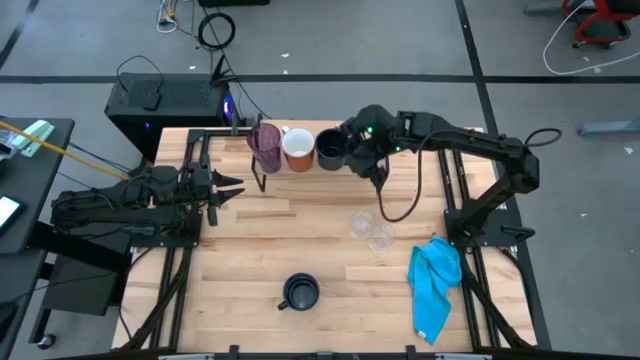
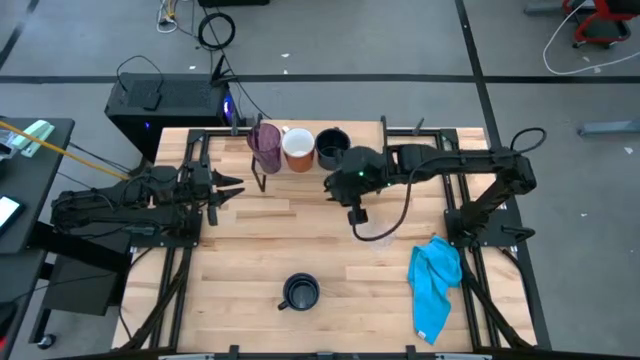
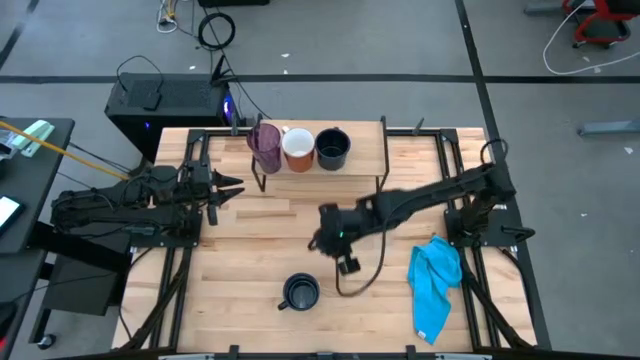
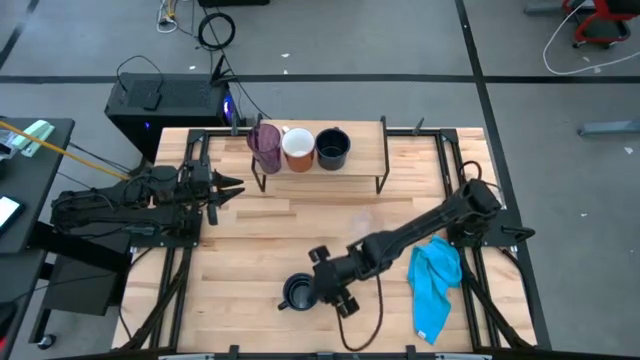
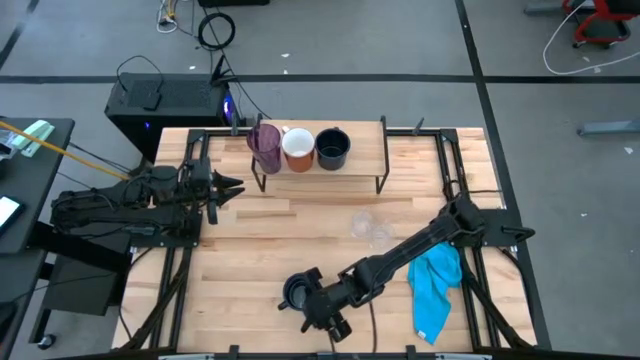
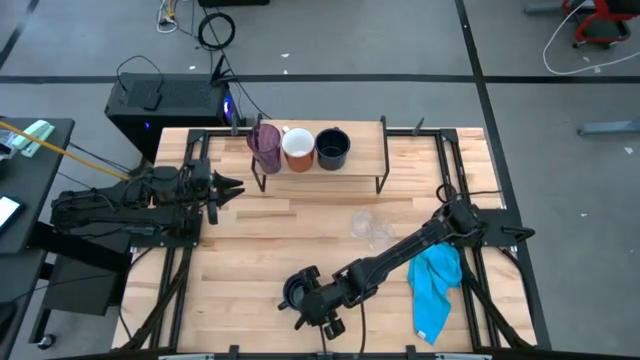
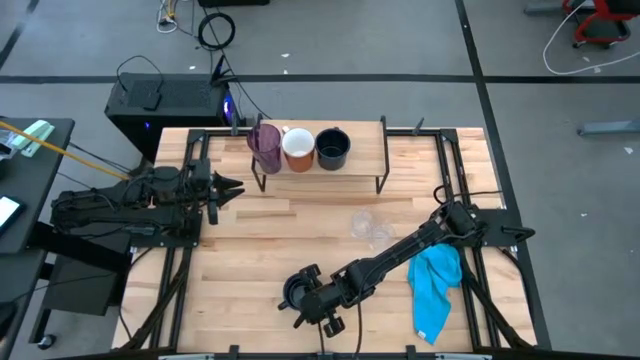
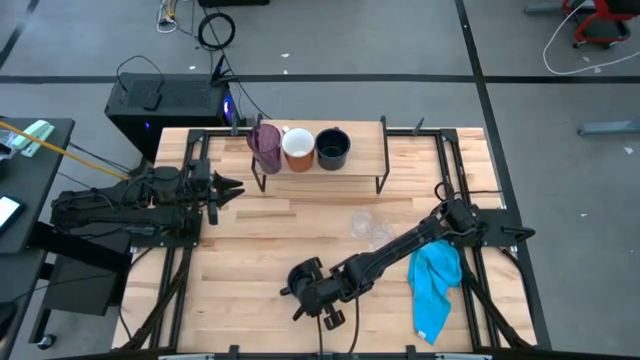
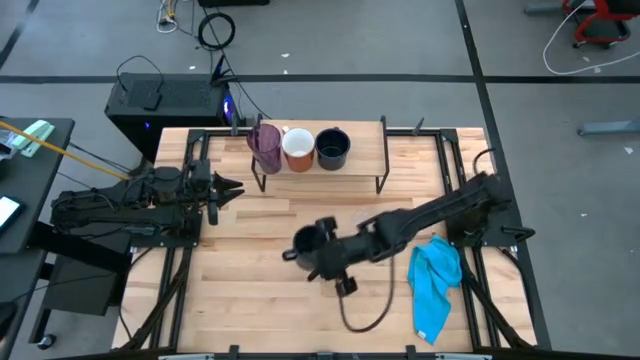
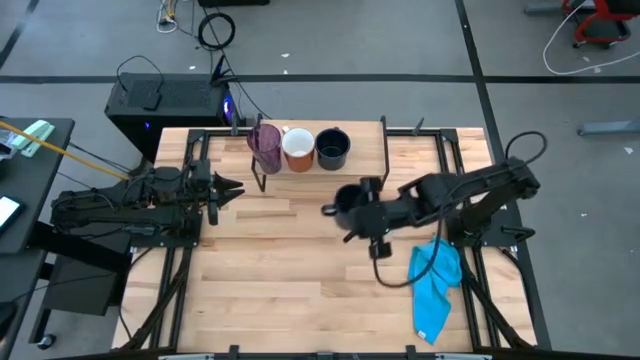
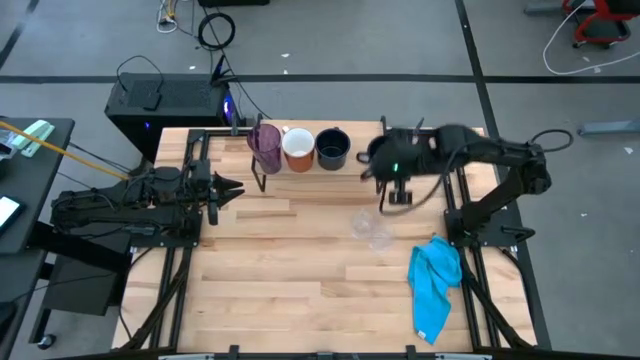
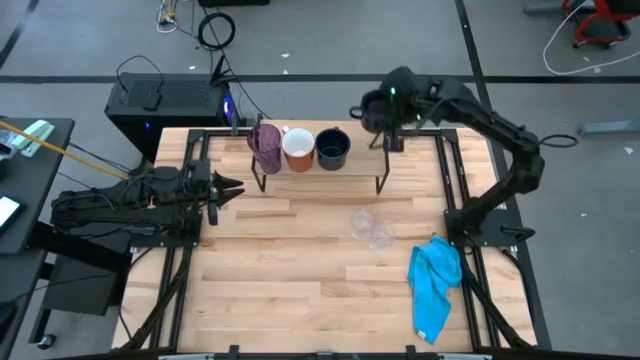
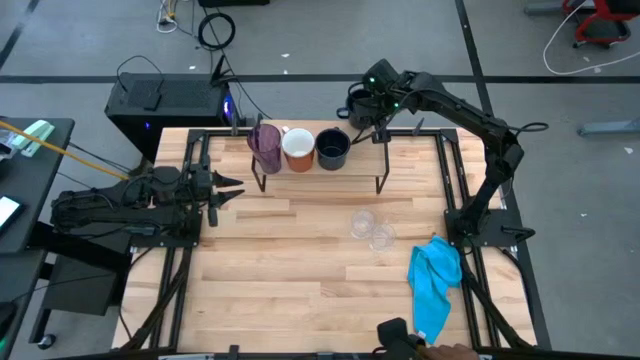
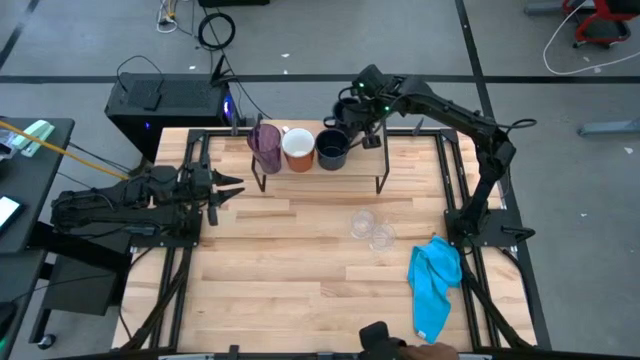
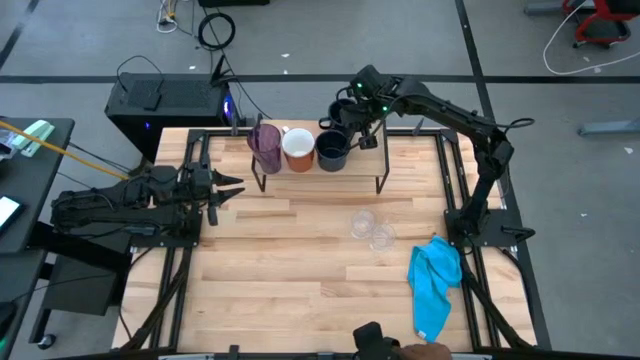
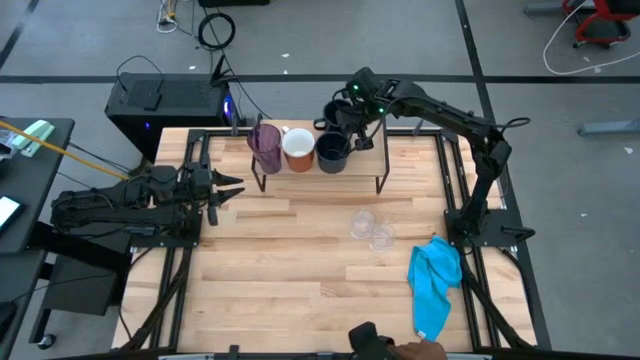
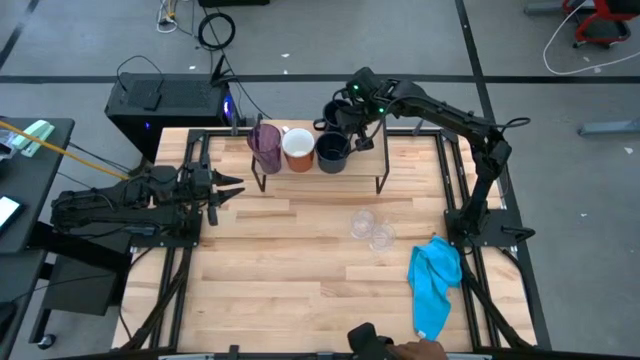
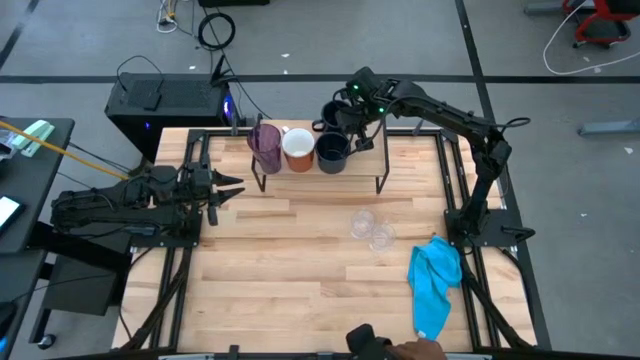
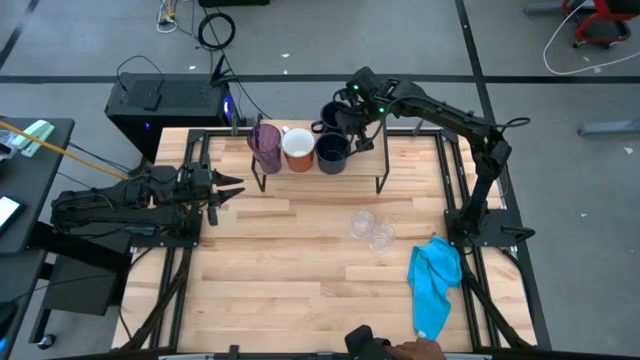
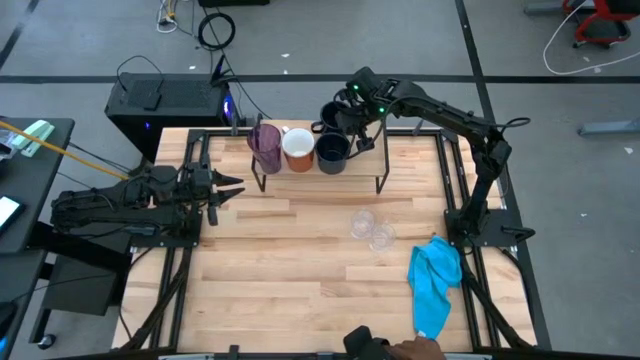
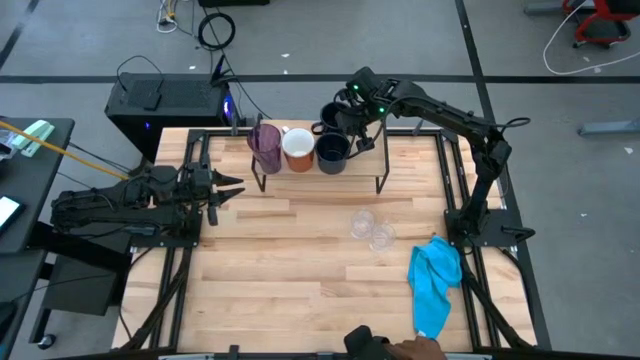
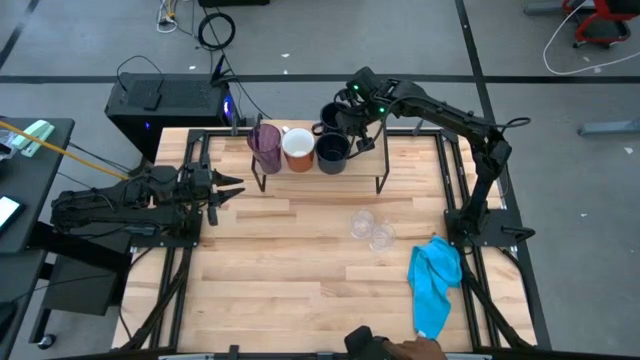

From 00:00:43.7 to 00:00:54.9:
Task: Stack small to large cups/mugs on shelf
Put the blue mug on the shelf

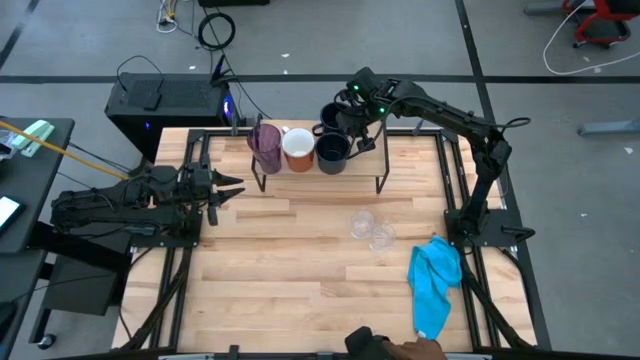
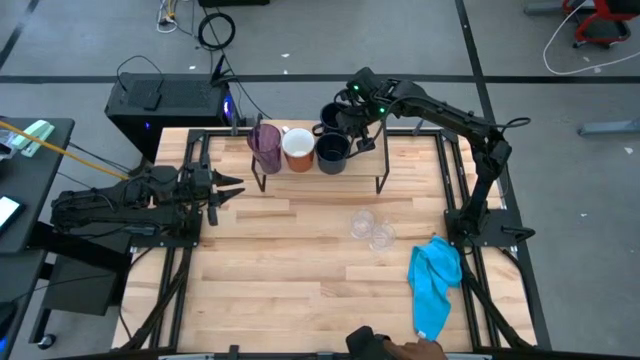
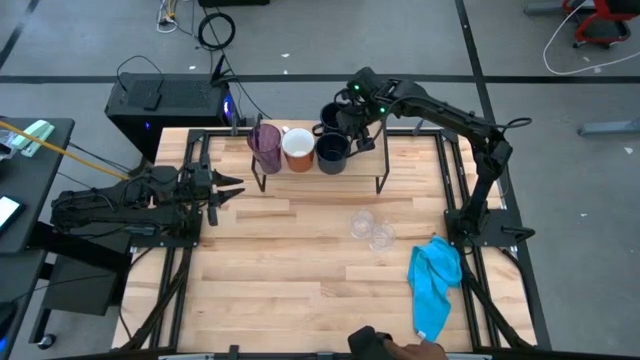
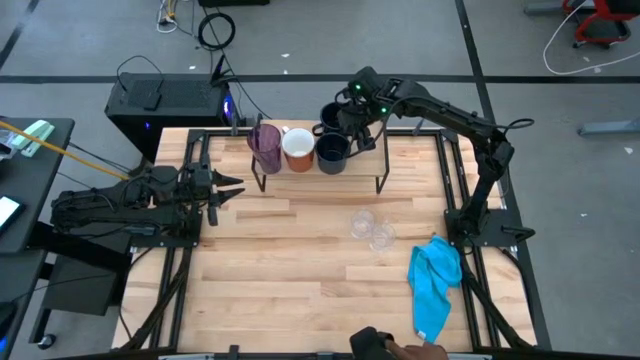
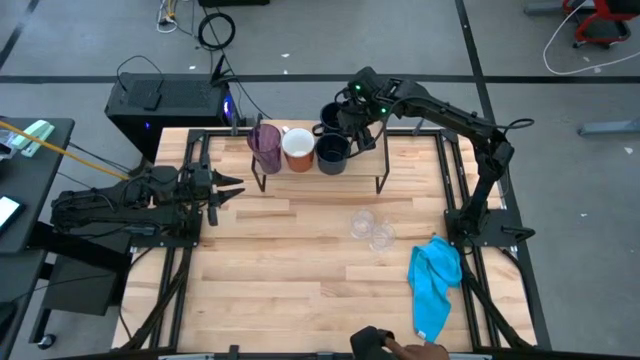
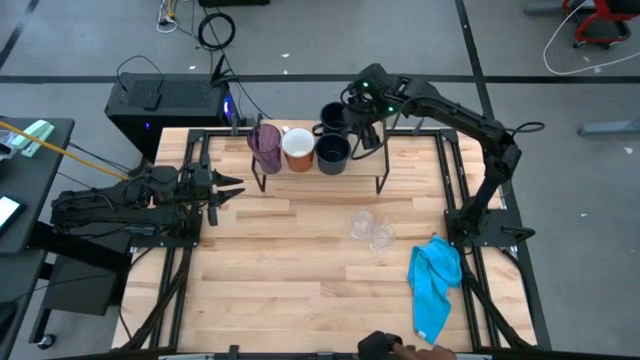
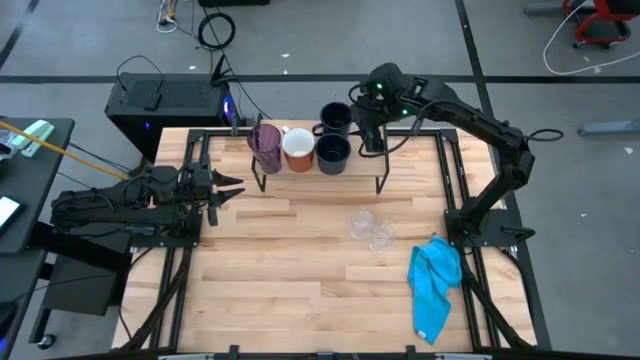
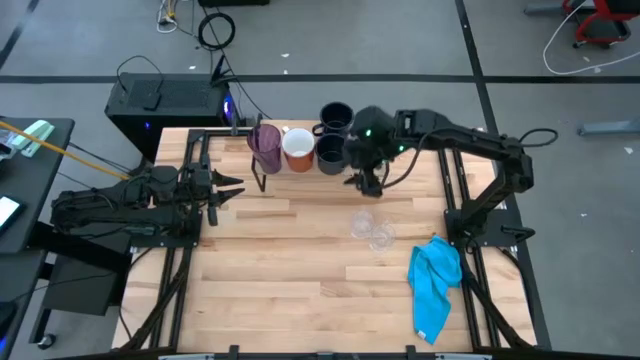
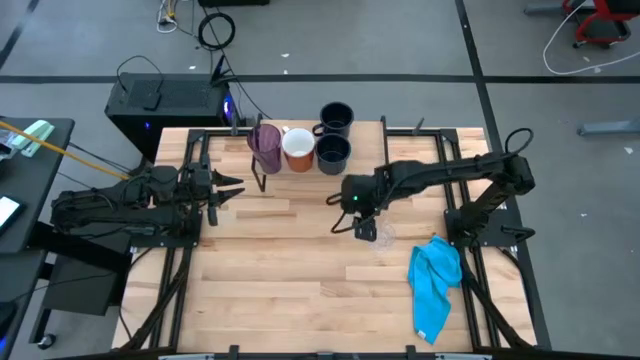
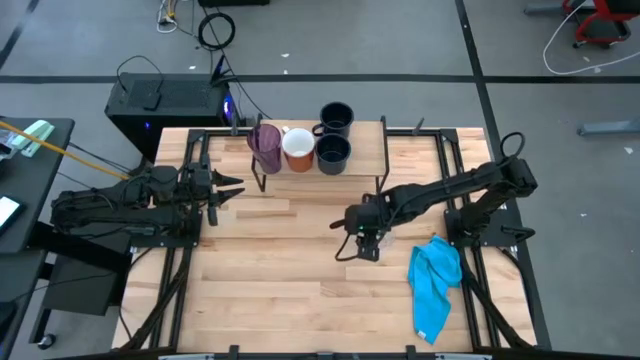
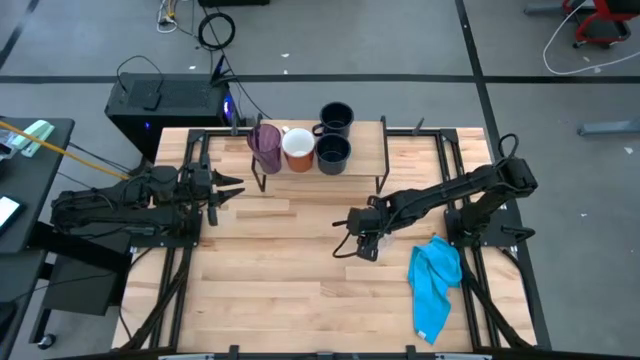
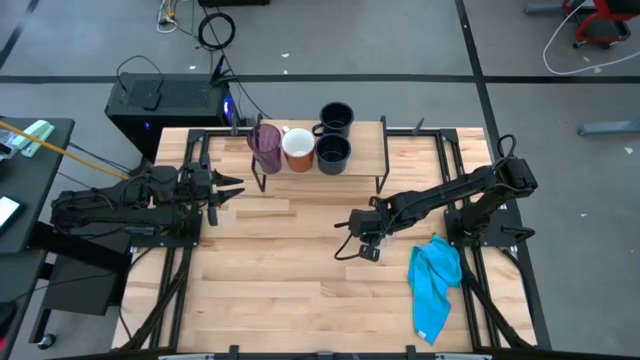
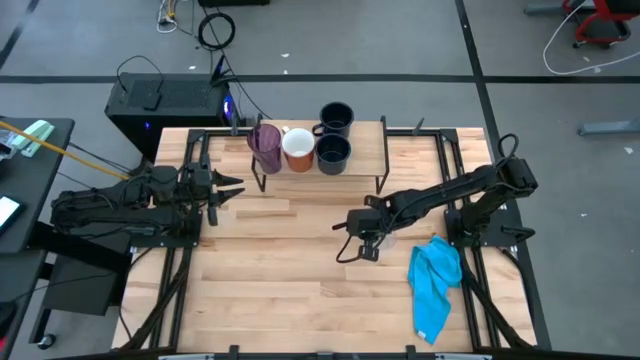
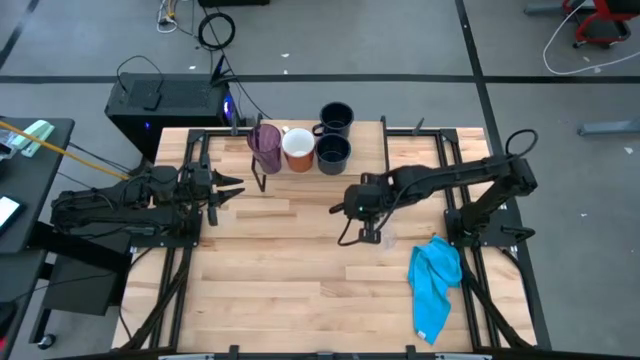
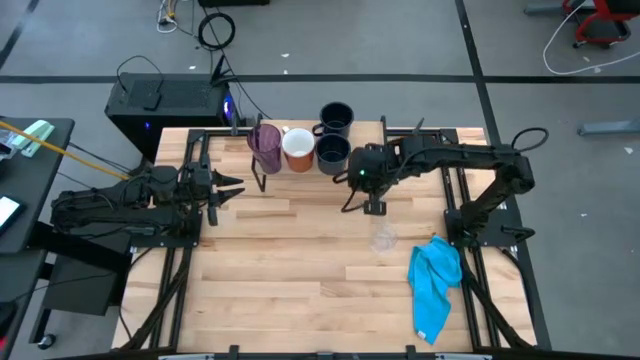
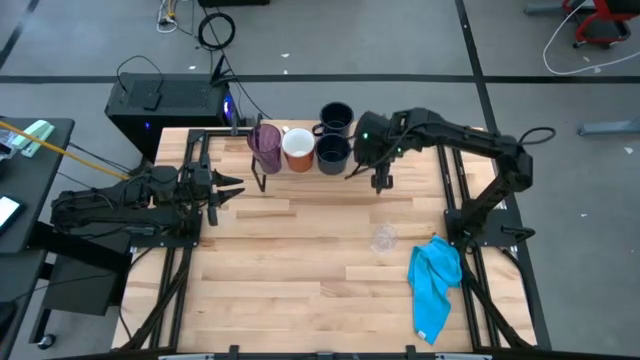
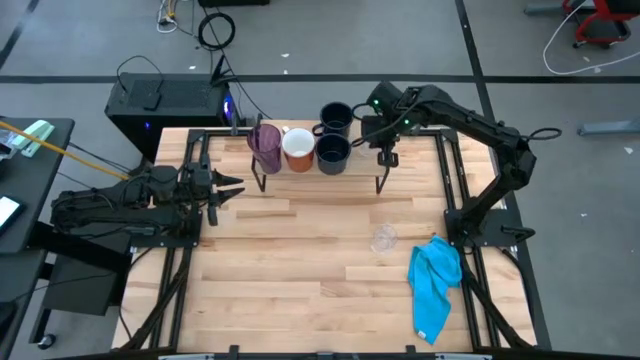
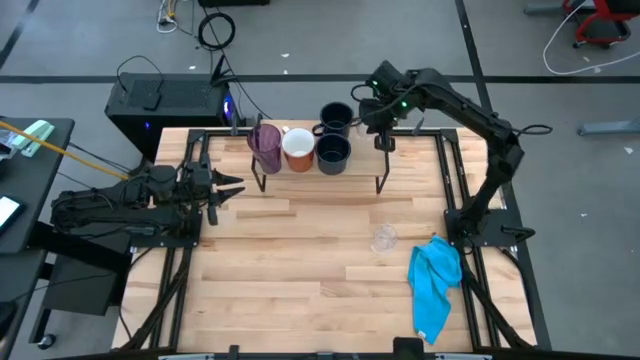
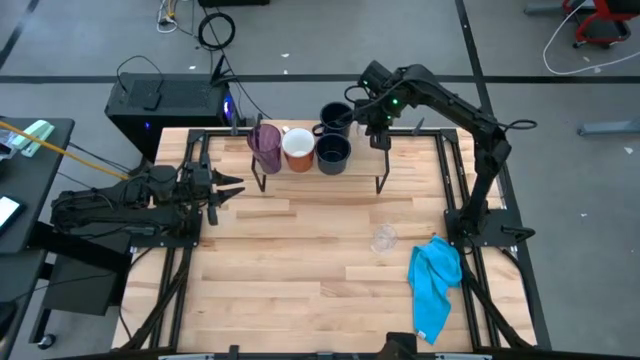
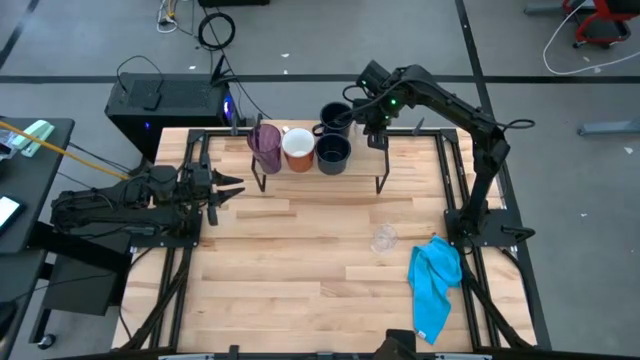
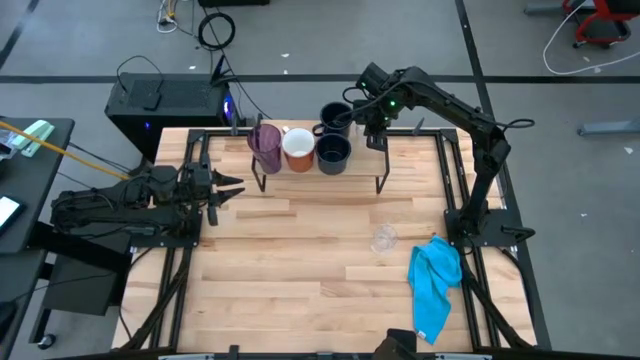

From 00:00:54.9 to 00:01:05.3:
Put the transparent mug on the shelf
